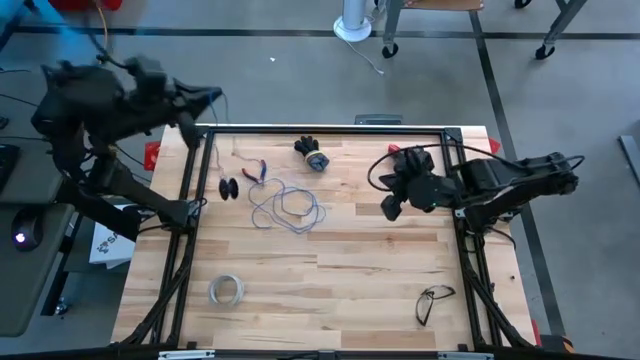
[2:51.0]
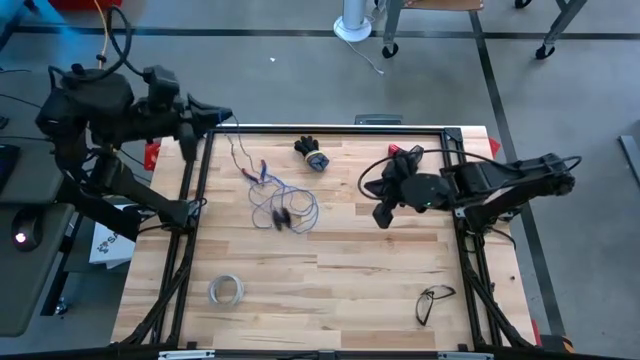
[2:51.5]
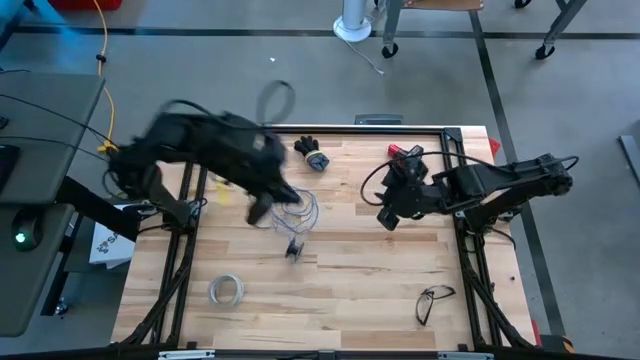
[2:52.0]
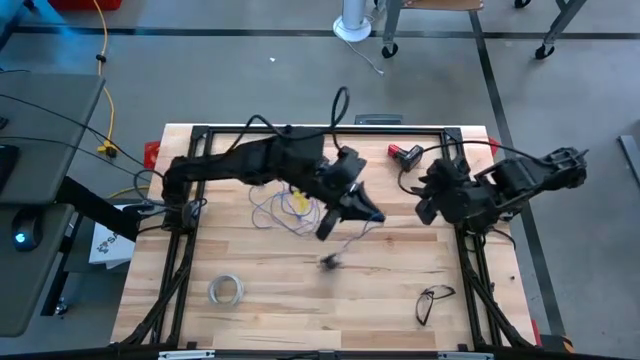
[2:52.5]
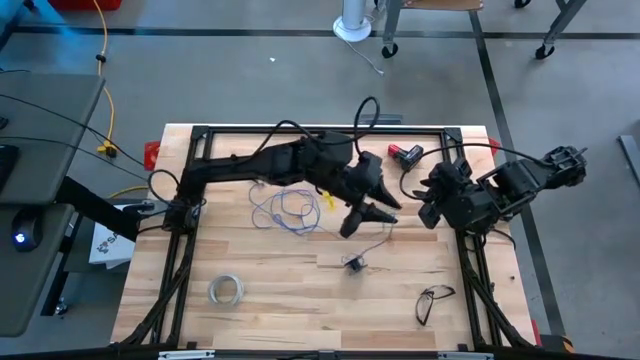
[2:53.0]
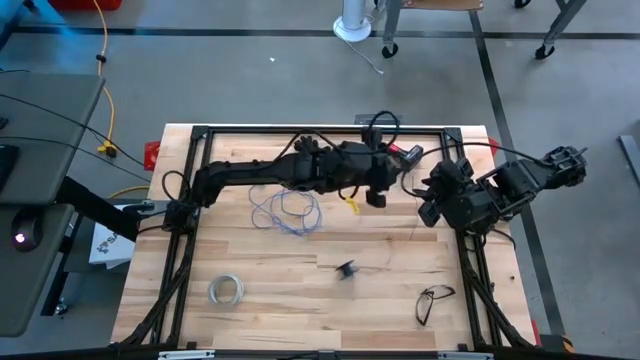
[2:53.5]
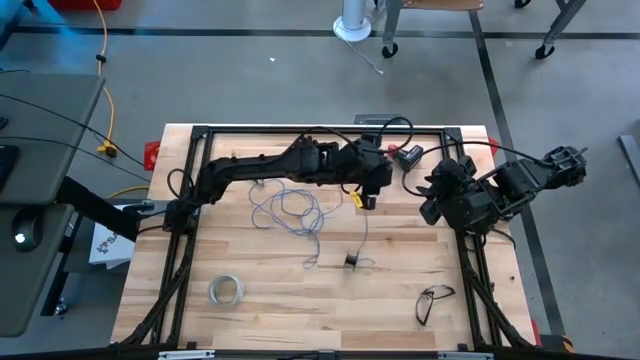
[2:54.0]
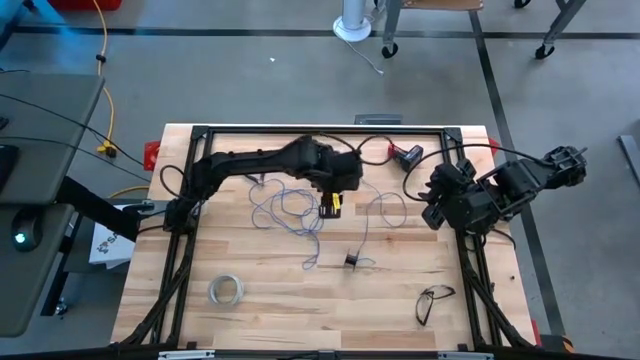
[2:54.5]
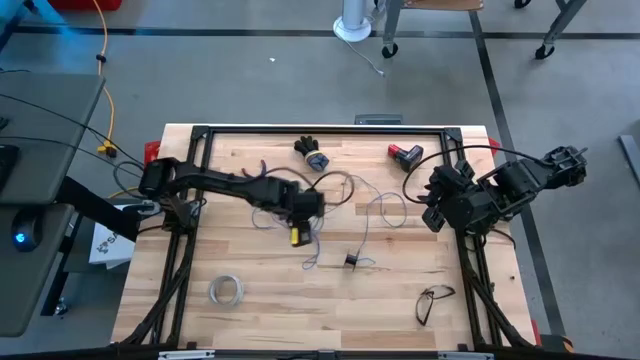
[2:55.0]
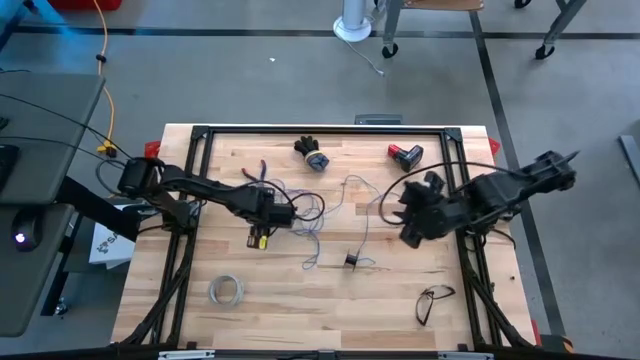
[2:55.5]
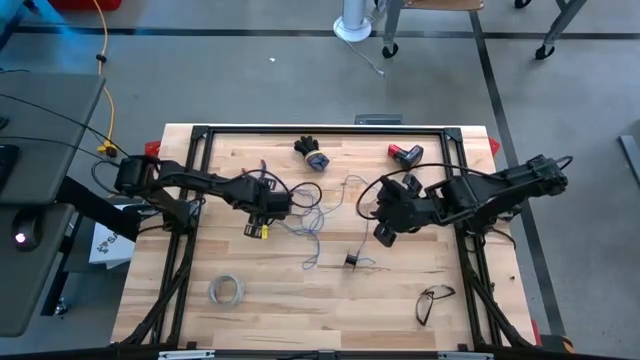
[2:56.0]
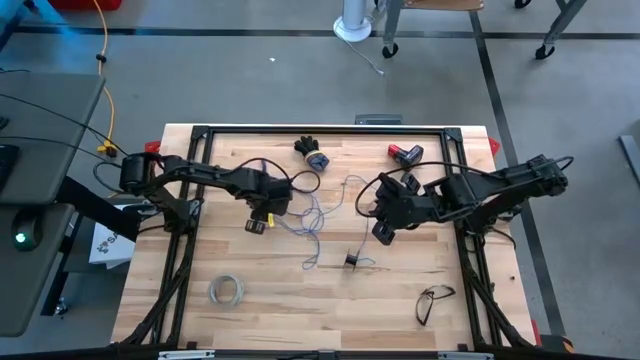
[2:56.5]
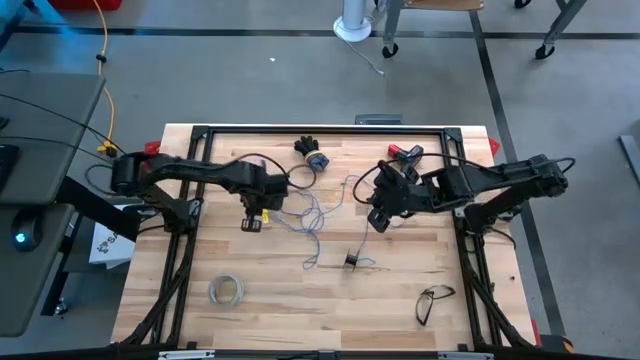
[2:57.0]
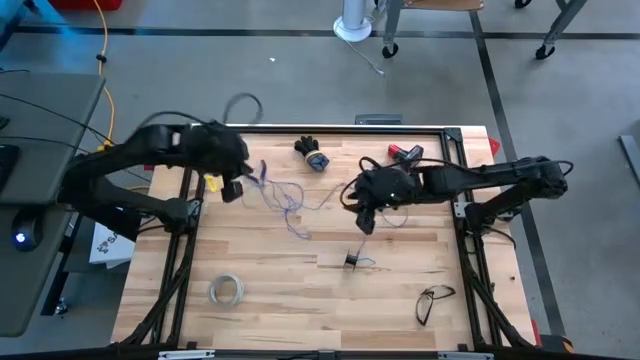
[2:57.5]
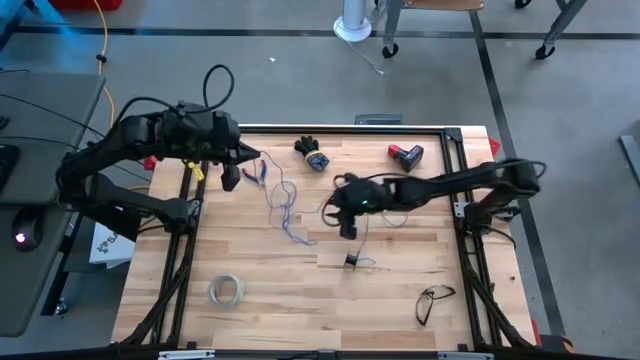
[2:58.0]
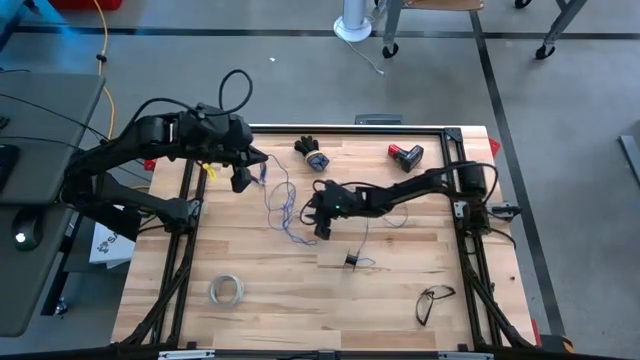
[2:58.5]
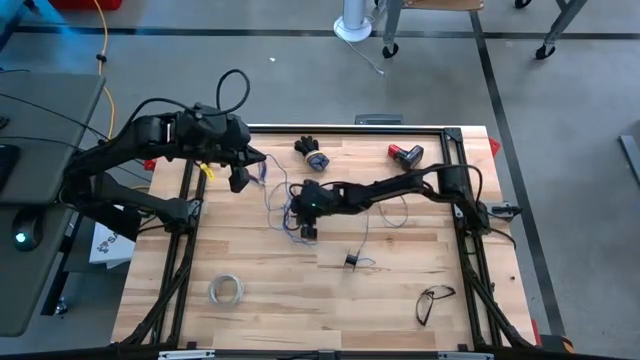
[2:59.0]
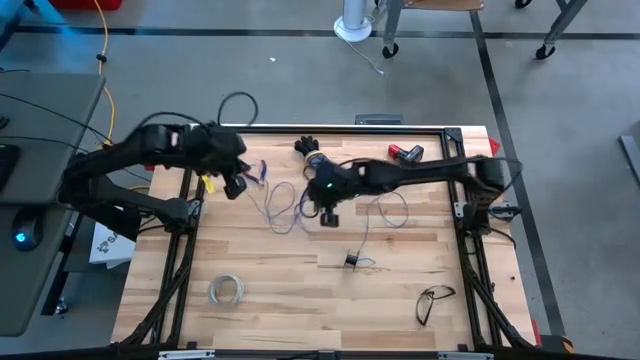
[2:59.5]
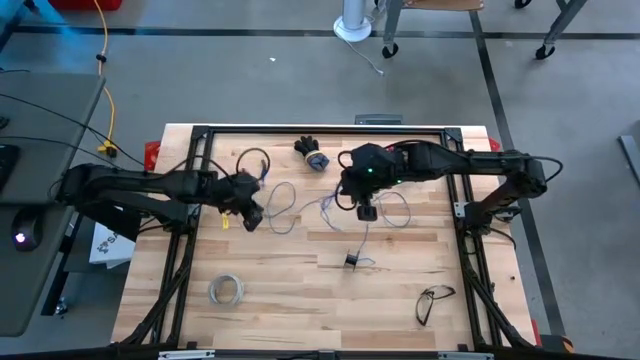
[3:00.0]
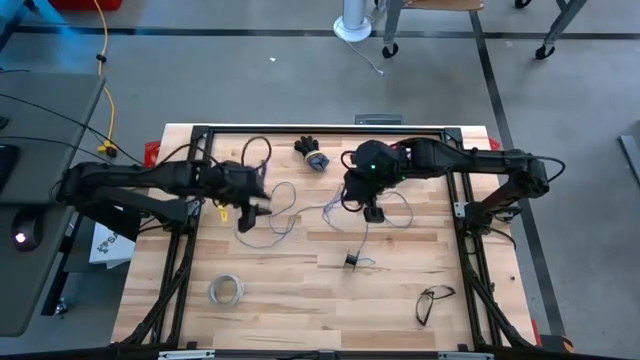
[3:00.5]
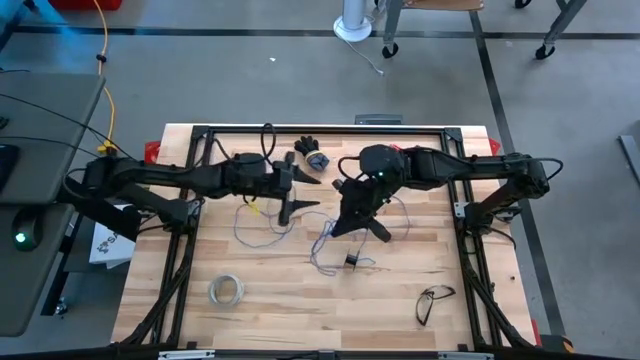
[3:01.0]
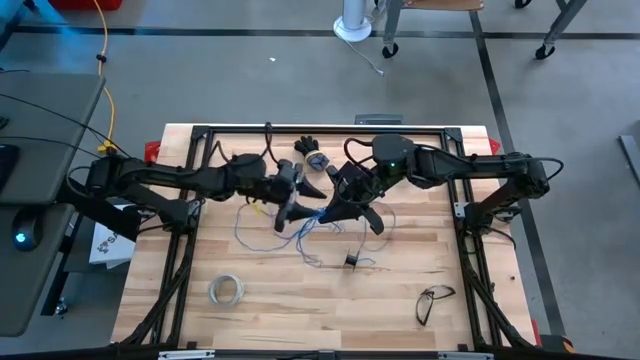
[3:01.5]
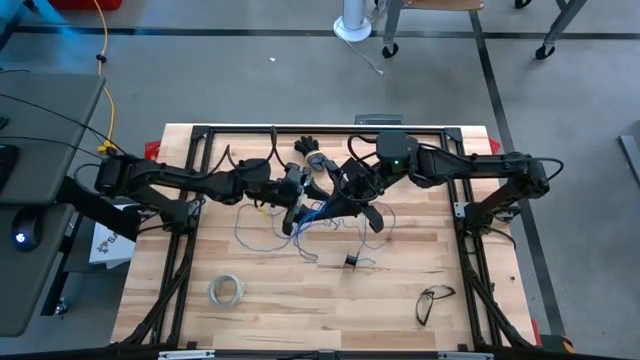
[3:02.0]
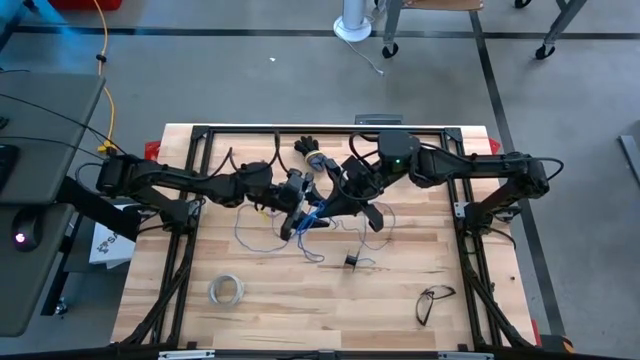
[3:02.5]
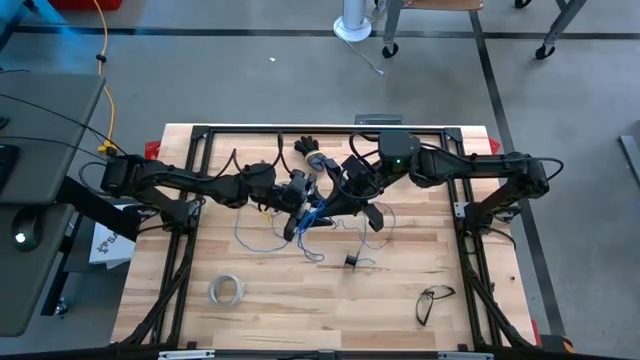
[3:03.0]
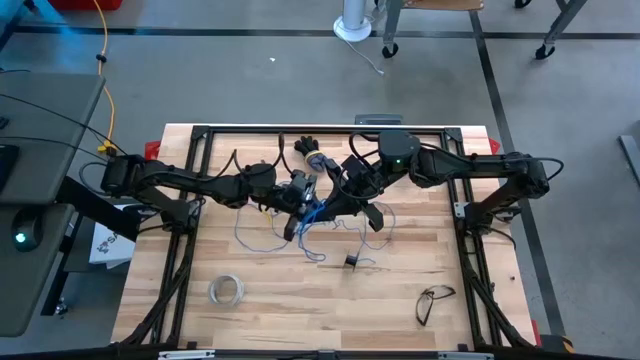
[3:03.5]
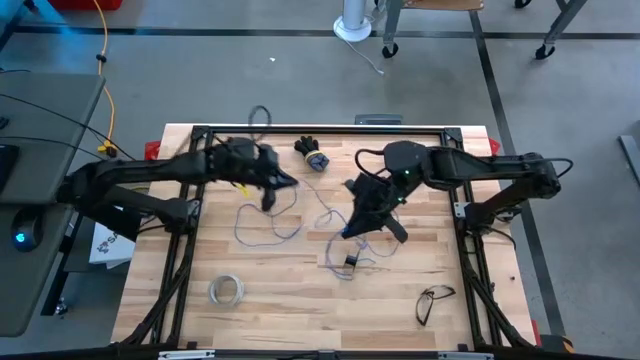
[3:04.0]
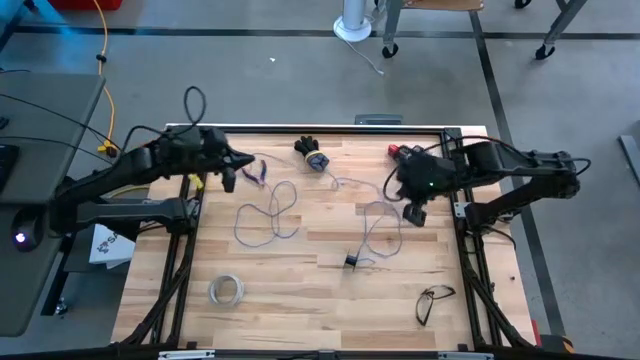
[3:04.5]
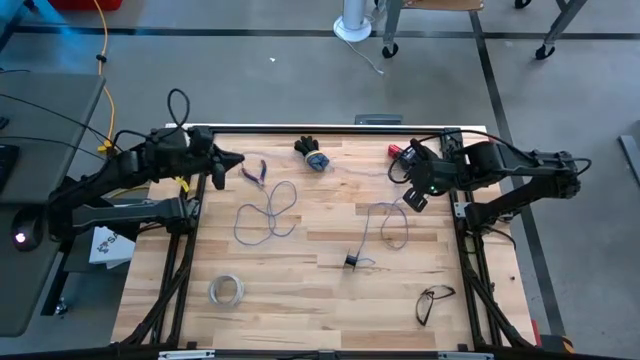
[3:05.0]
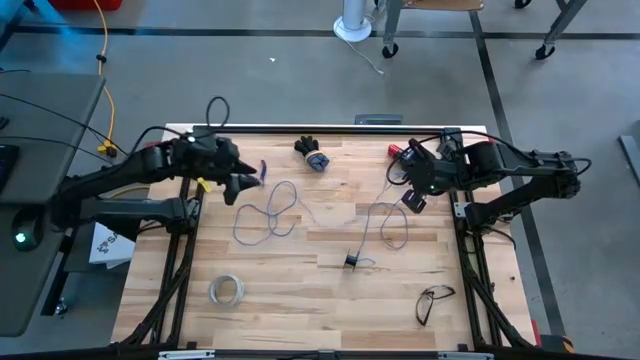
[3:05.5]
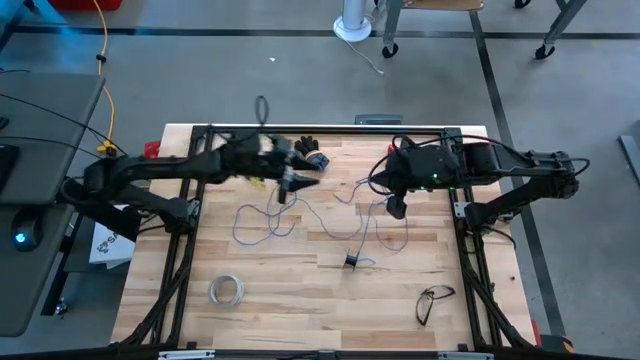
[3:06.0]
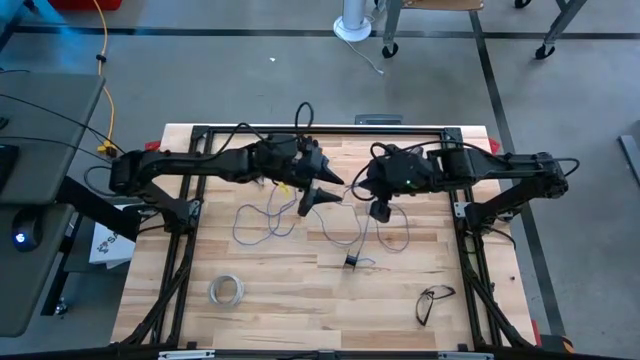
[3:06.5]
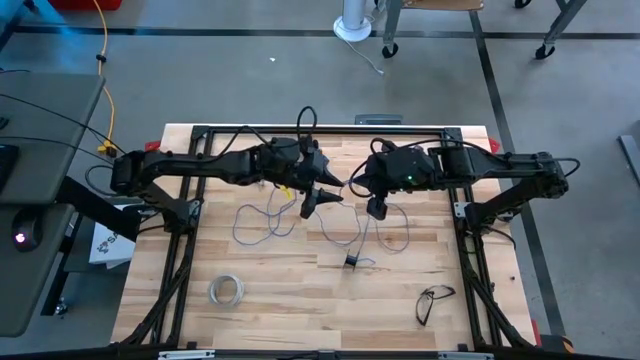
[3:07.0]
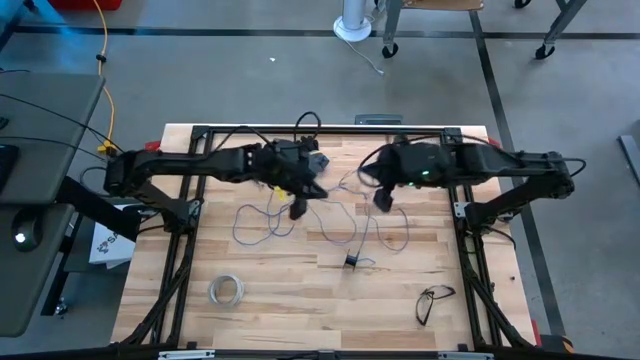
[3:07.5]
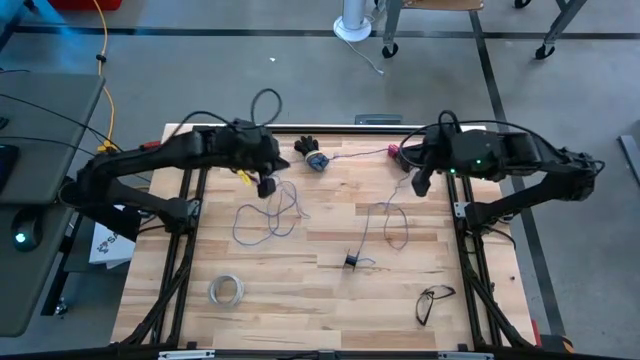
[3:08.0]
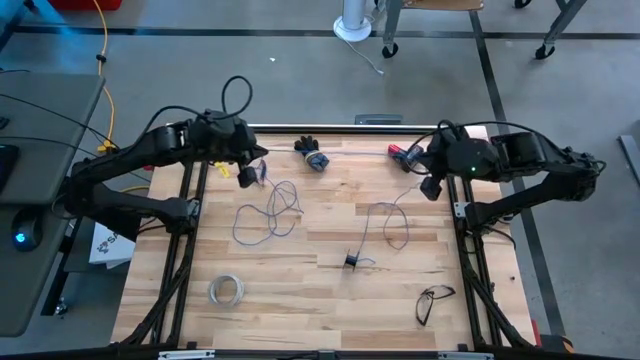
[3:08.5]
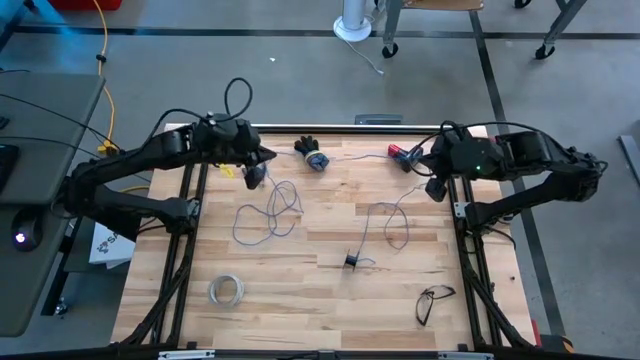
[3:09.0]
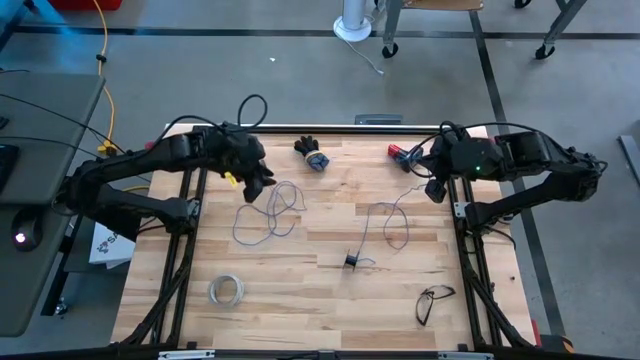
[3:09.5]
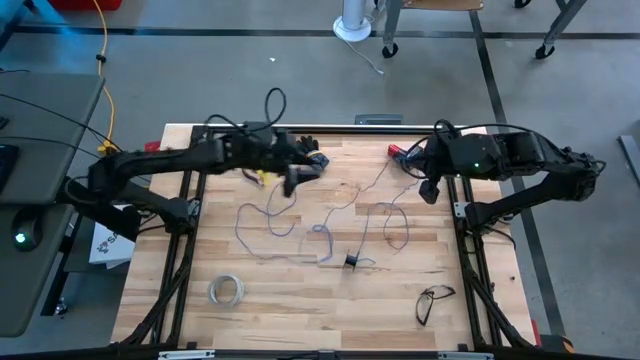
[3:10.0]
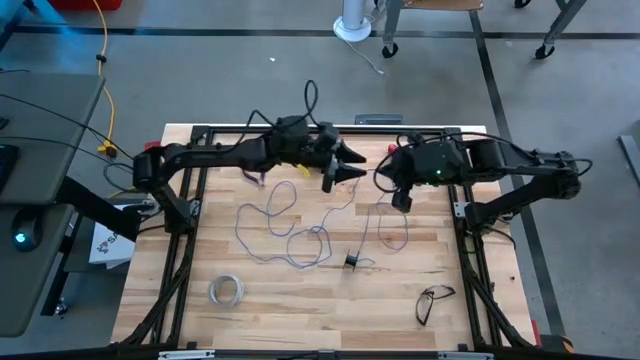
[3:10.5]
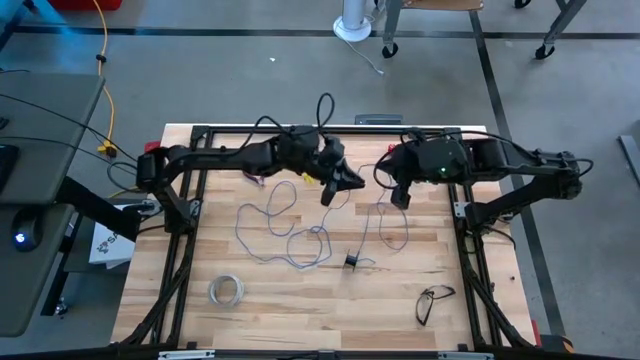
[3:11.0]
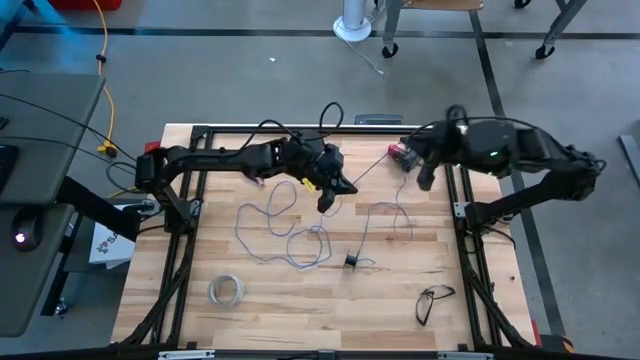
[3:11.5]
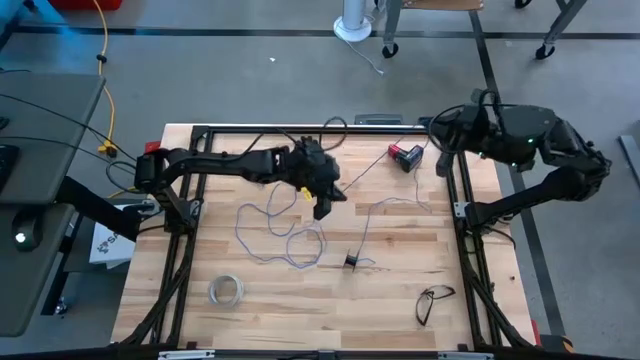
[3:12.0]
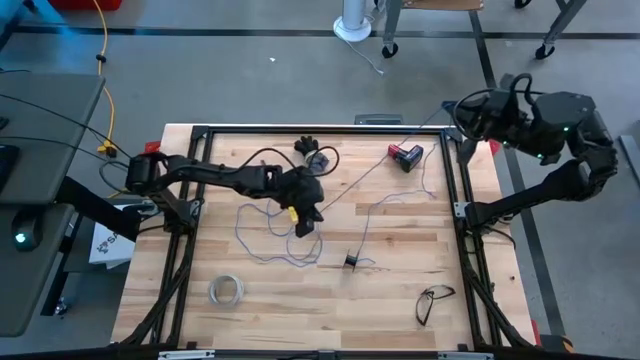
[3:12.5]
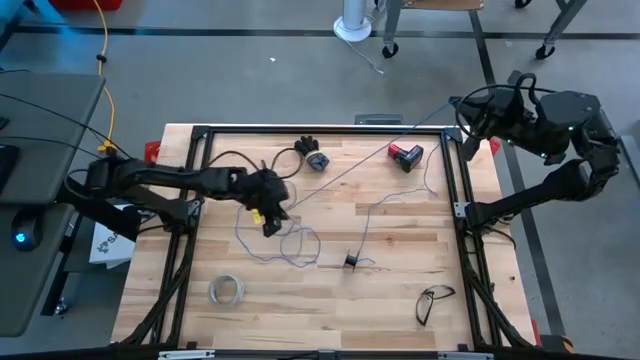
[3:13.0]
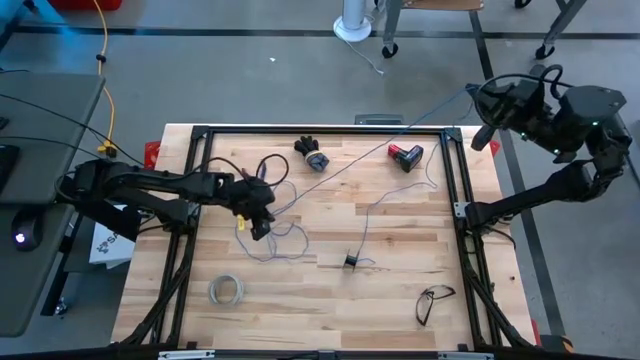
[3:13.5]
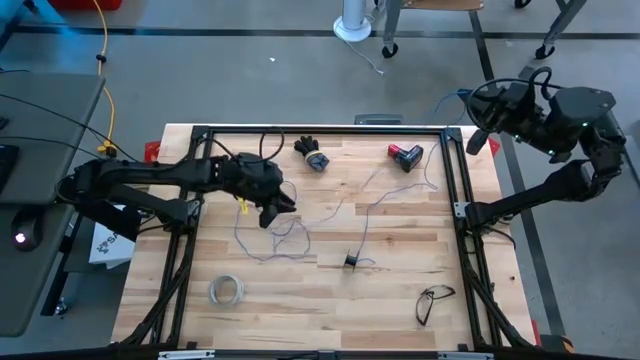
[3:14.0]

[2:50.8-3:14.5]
Task: Coil cords
Uncoil the blue wire from the black spool
